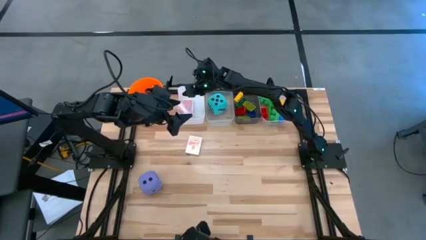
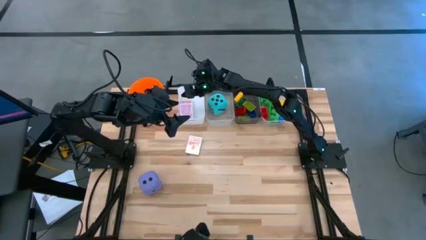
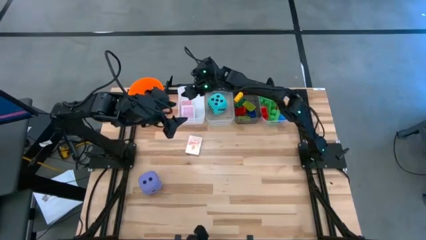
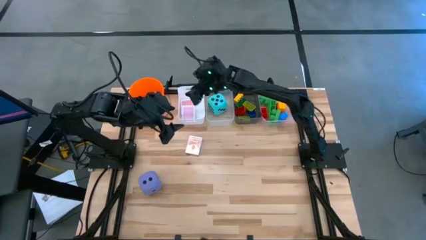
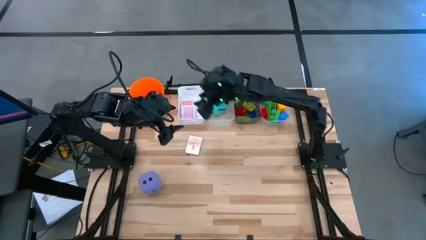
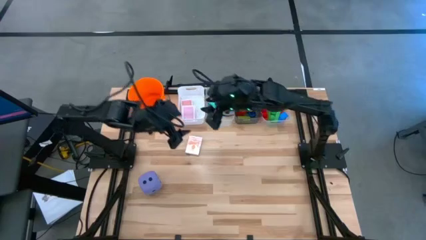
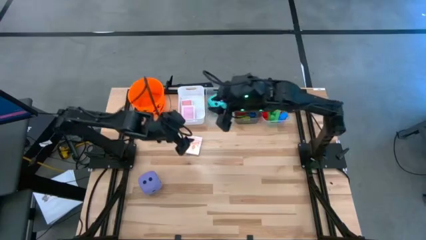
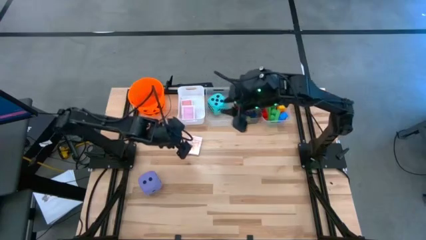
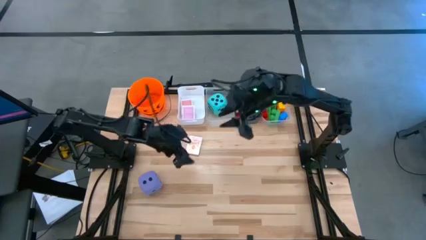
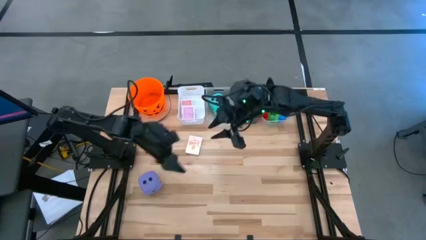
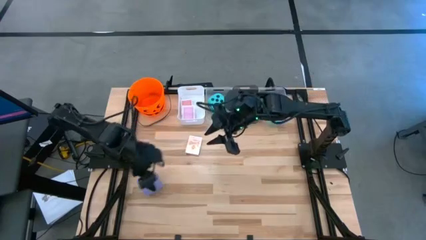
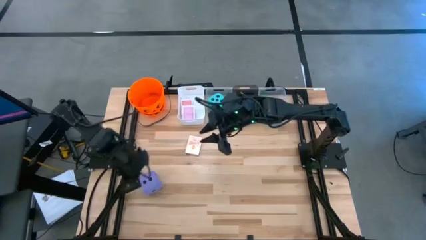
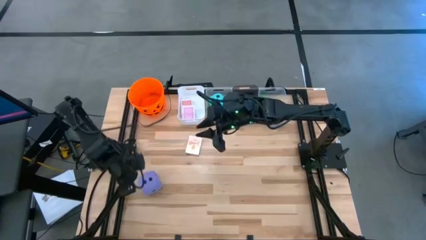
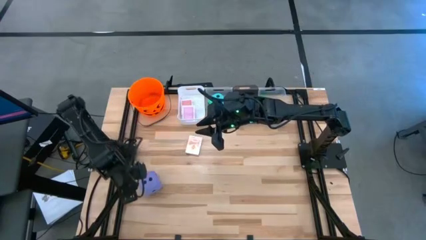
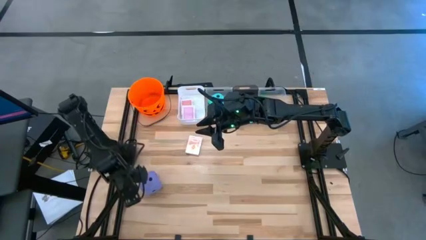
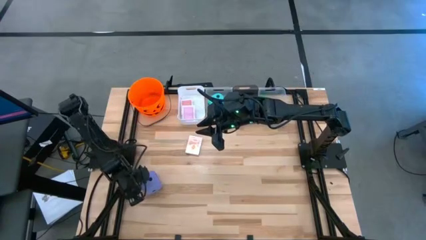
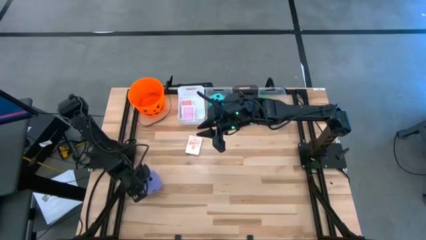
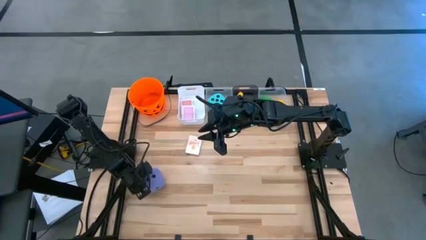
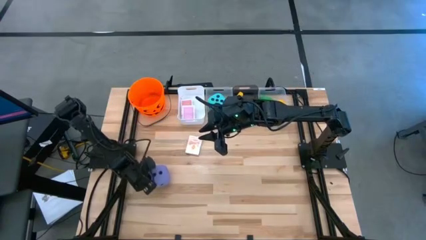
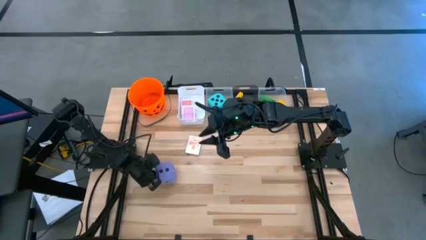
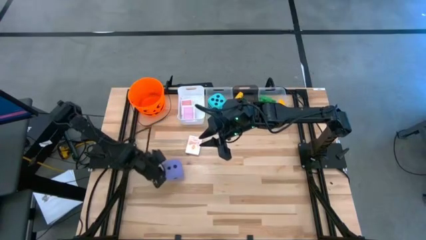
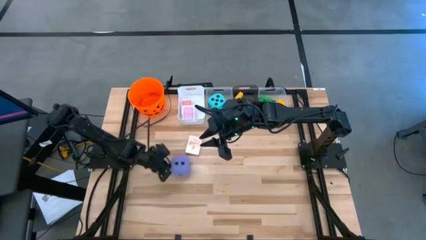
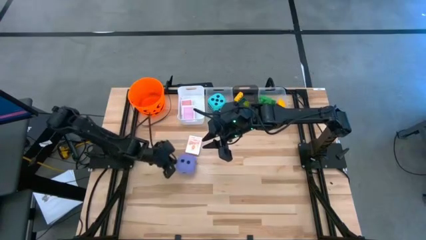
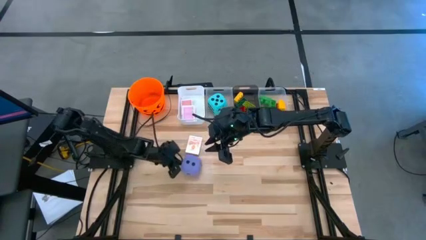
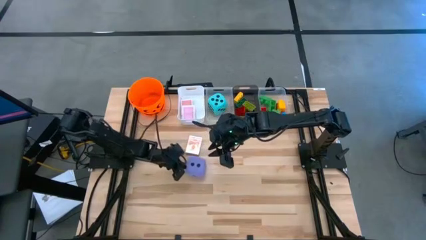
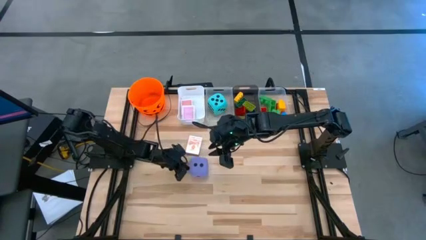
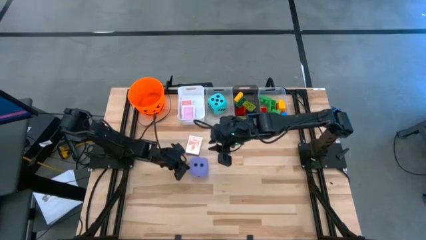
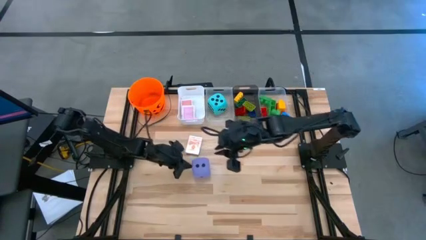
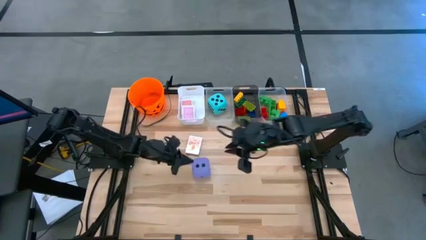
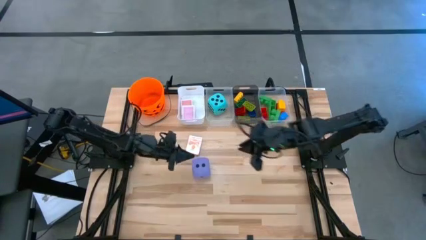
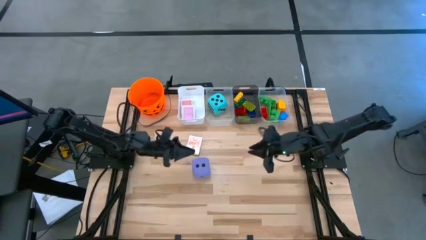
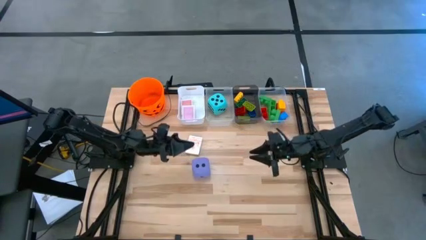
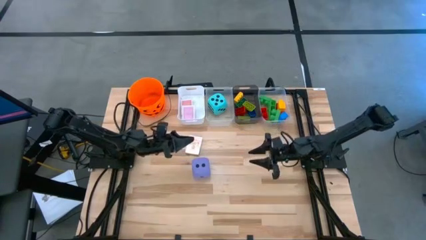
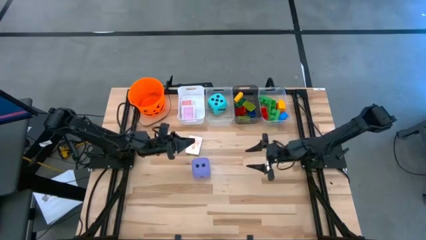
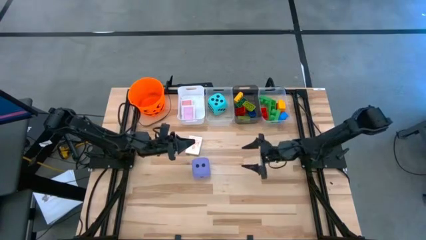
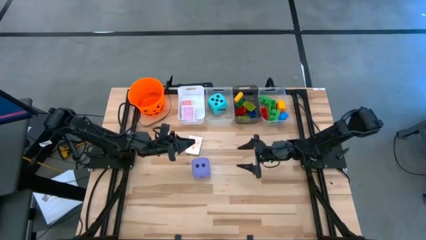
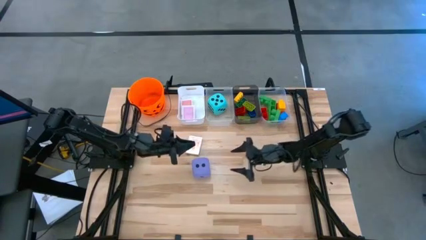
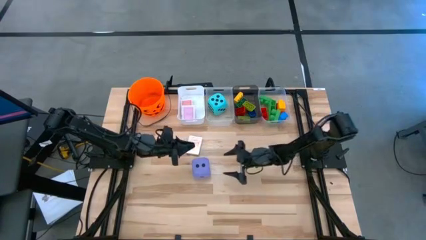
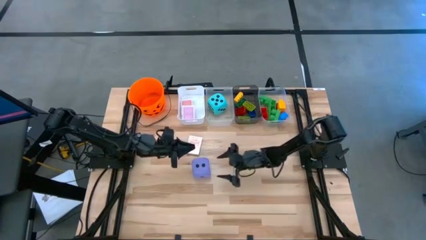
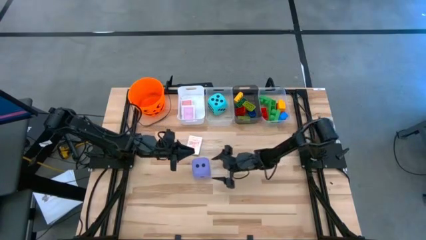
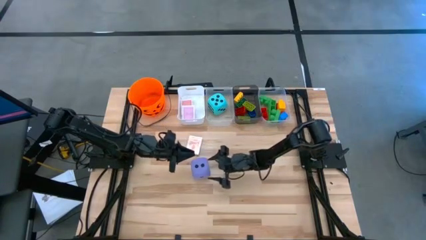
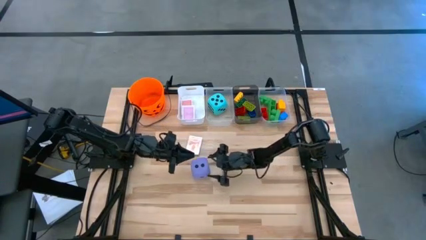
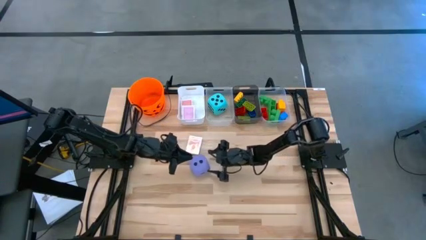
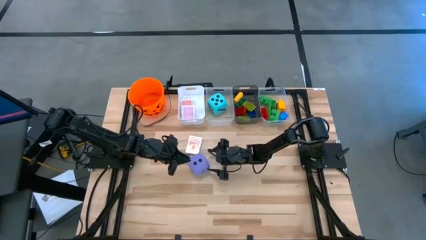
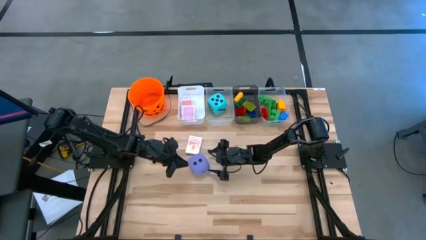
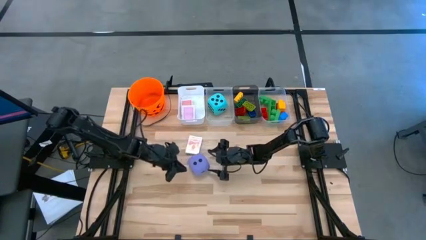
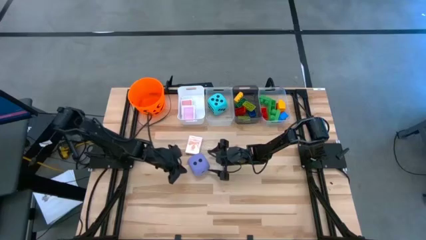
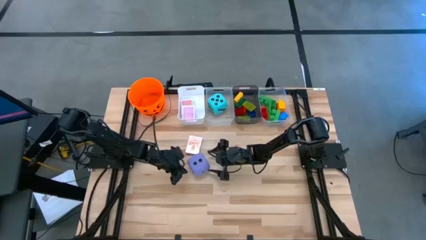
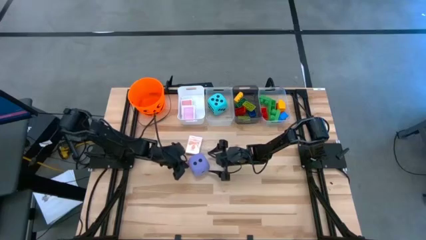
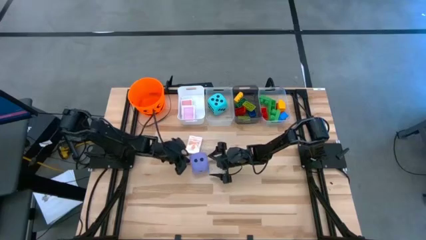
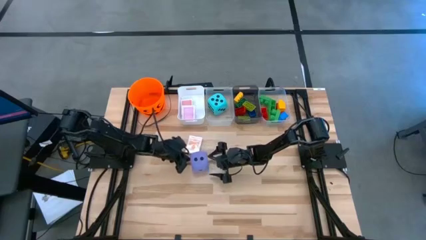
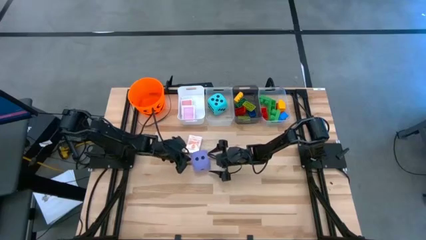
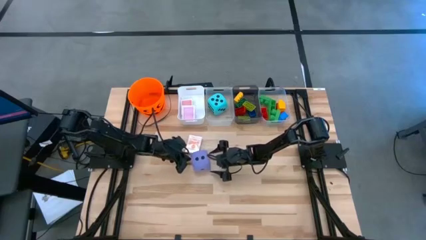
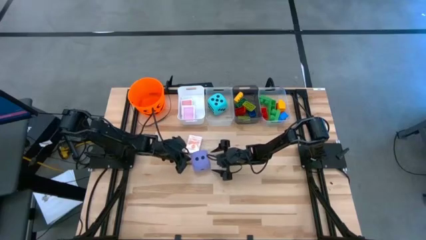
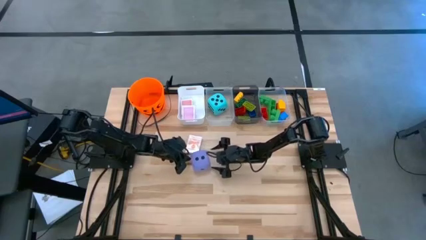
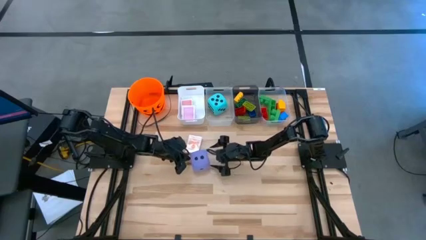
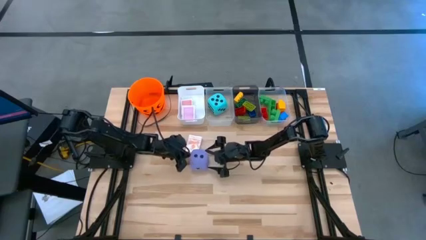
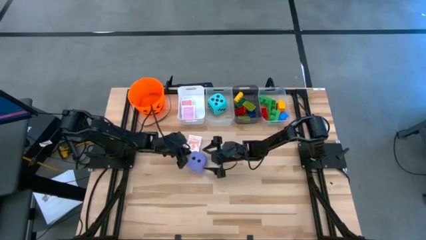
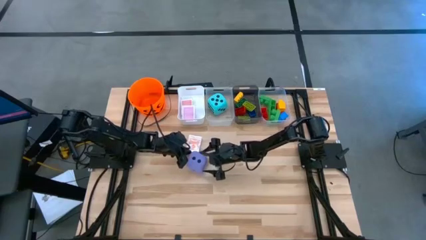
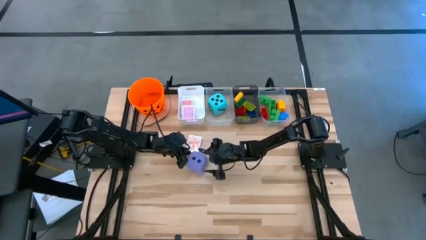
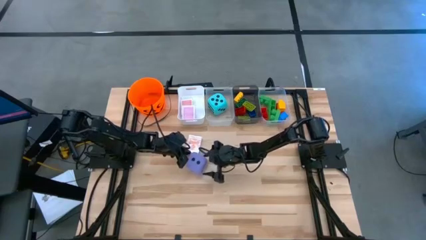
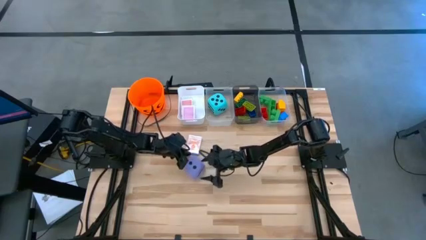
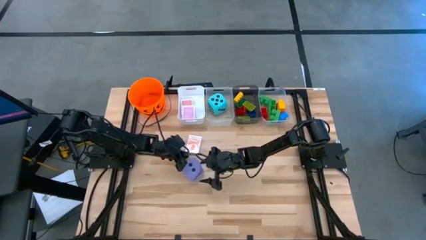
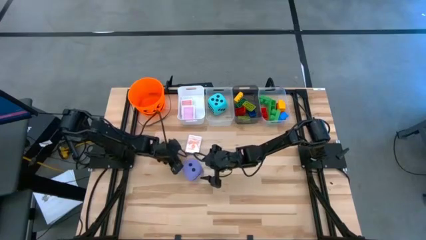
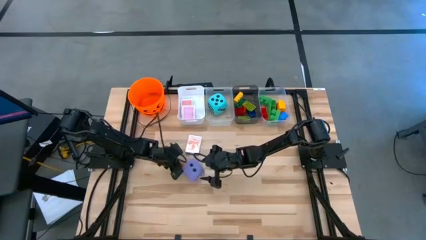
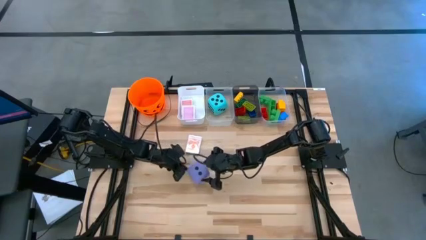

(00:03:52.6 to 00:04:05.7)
Task: Pick & Place Toys
Put the violet dice into the left transparent bin
